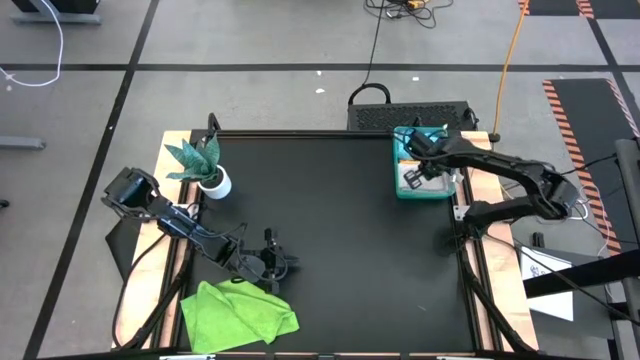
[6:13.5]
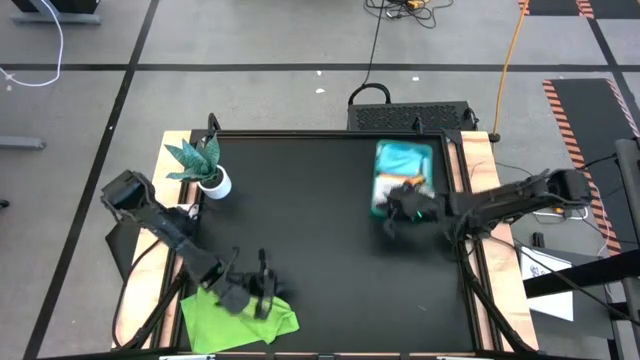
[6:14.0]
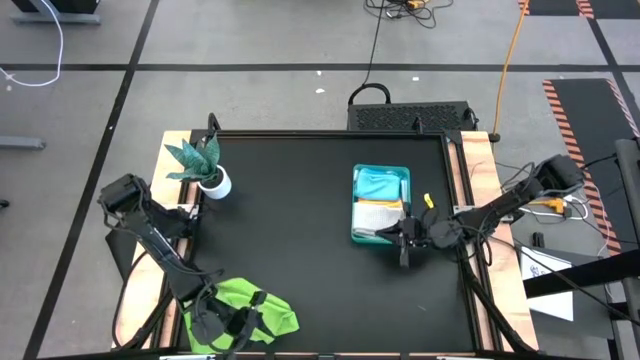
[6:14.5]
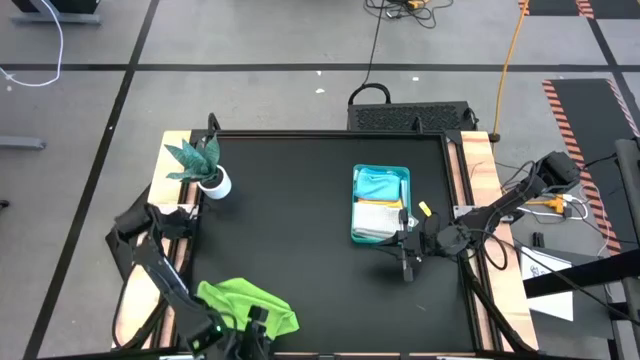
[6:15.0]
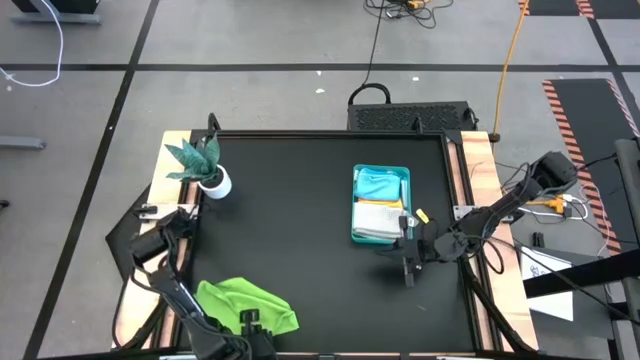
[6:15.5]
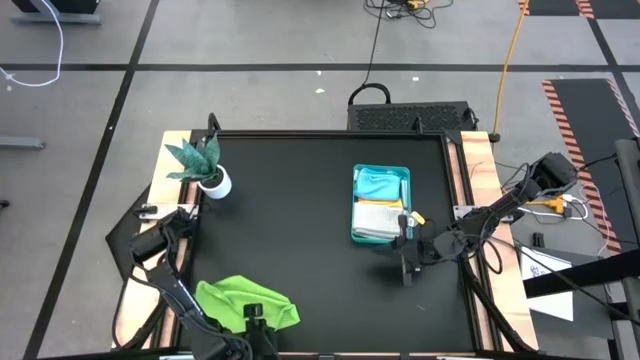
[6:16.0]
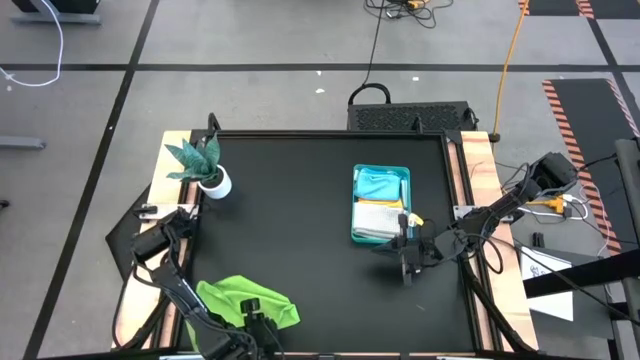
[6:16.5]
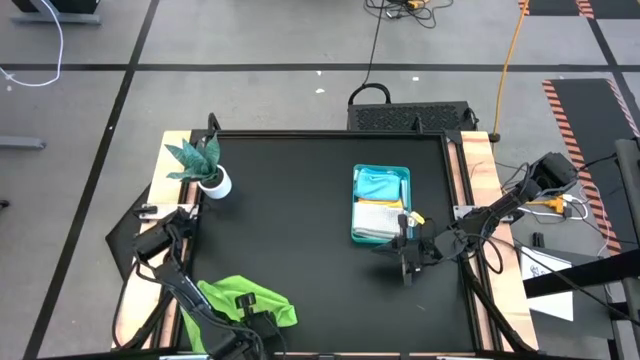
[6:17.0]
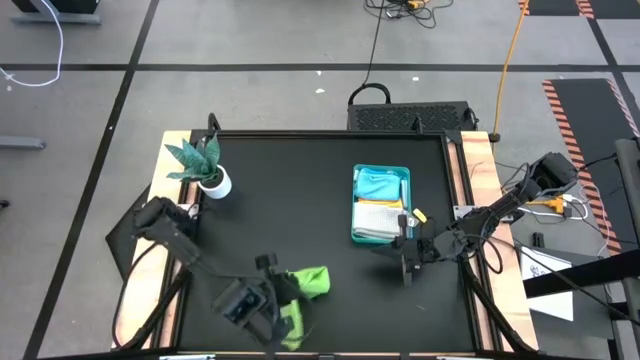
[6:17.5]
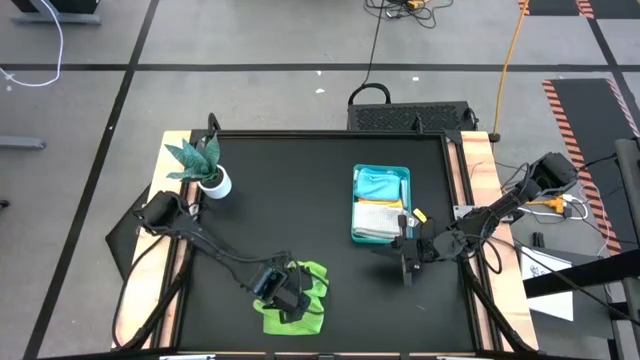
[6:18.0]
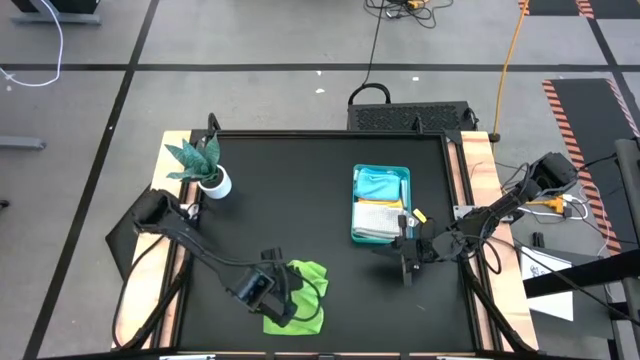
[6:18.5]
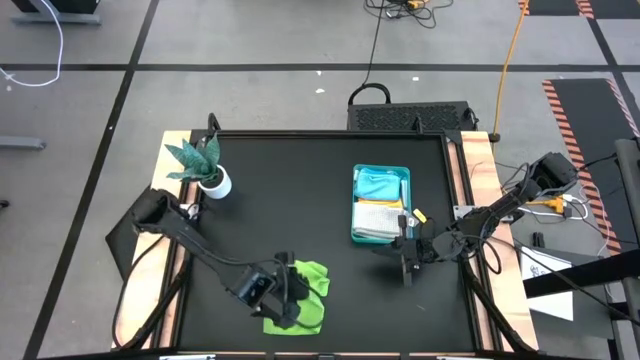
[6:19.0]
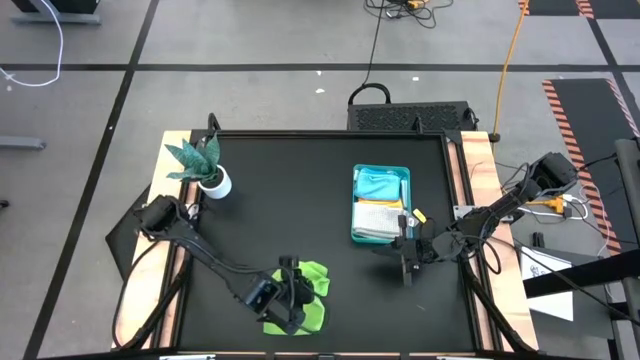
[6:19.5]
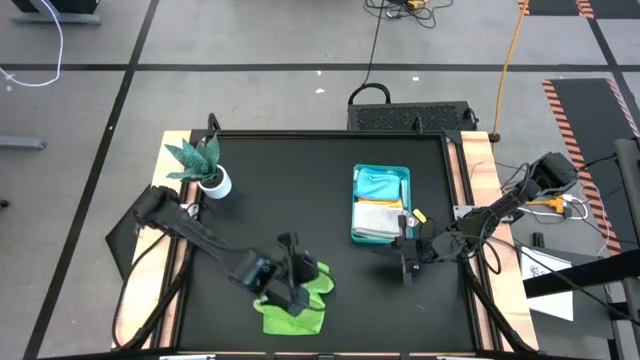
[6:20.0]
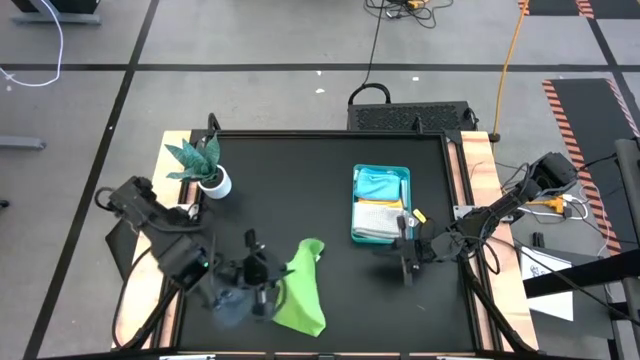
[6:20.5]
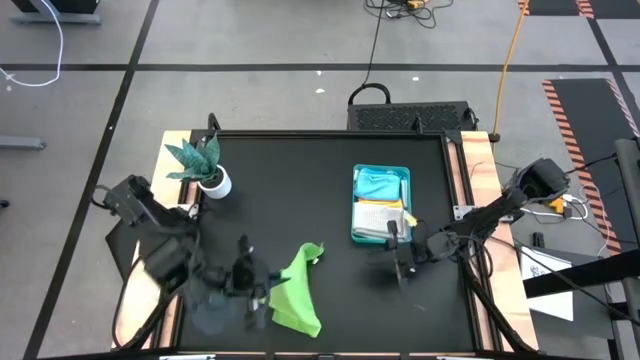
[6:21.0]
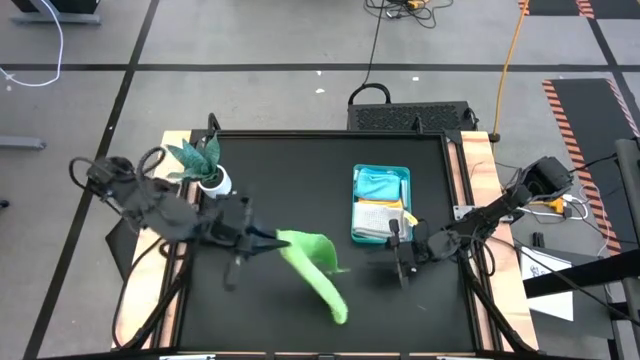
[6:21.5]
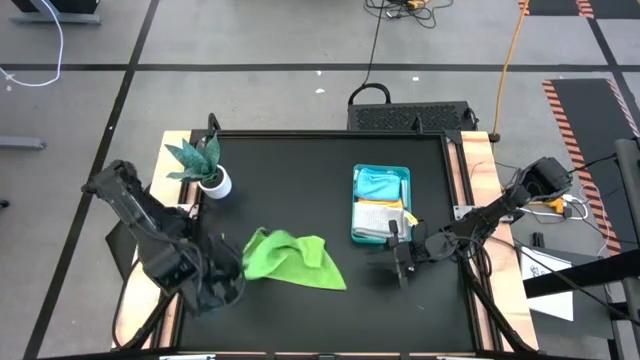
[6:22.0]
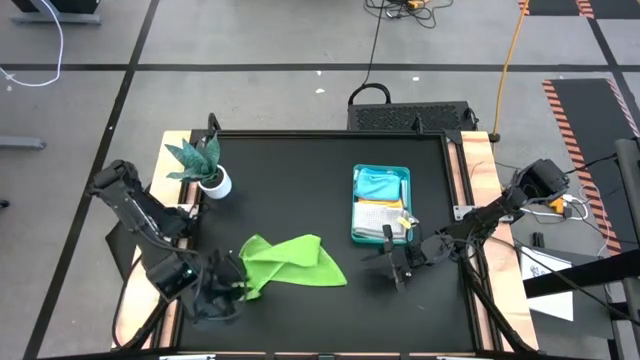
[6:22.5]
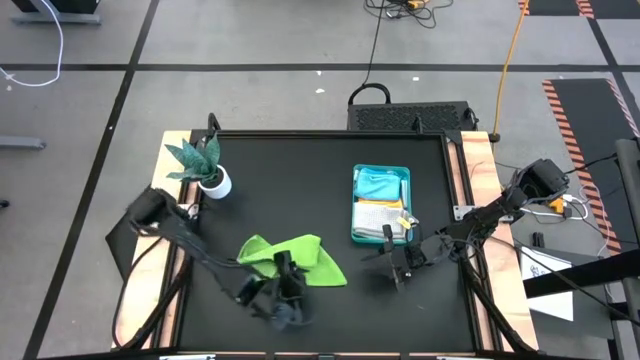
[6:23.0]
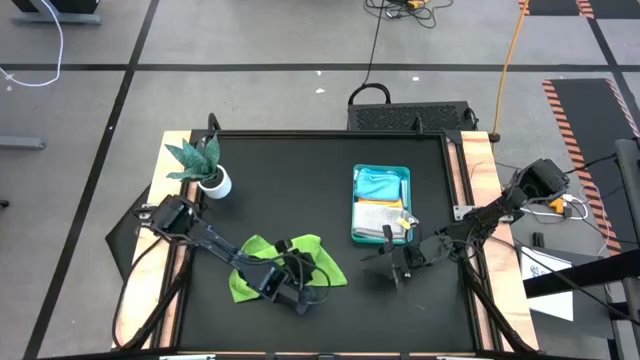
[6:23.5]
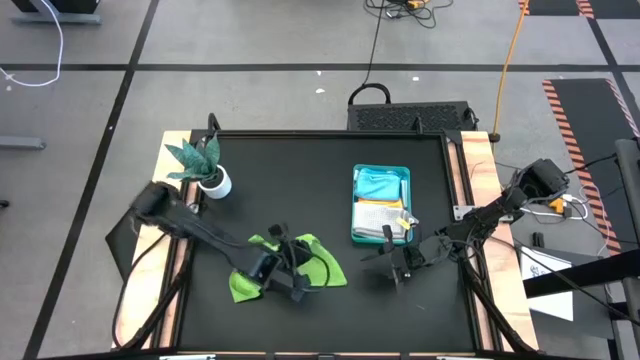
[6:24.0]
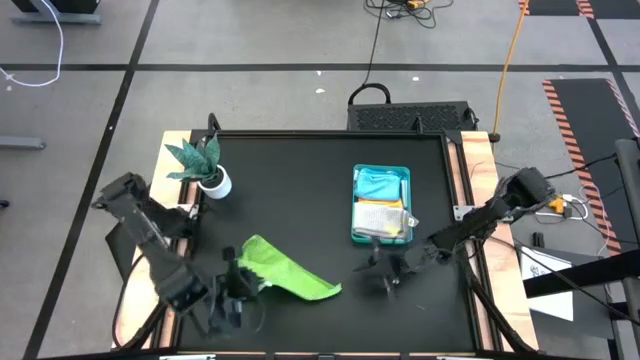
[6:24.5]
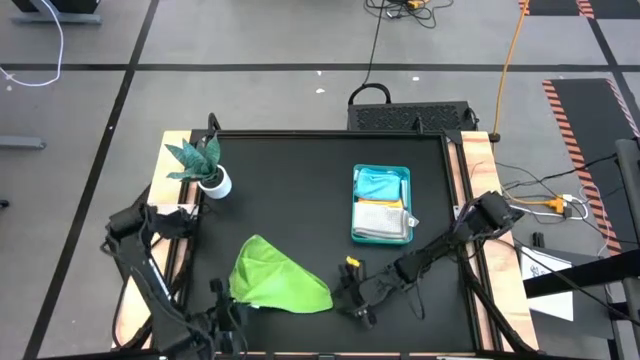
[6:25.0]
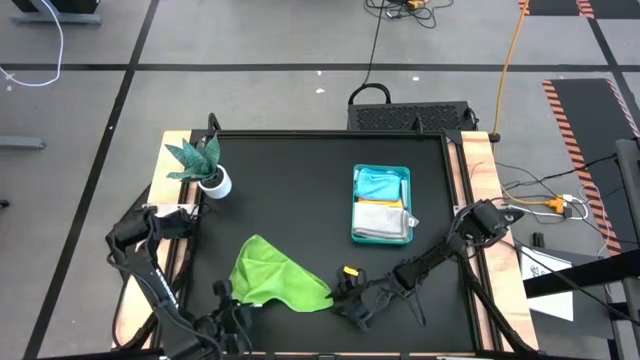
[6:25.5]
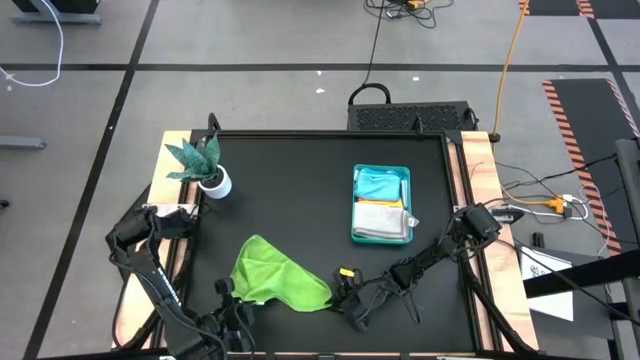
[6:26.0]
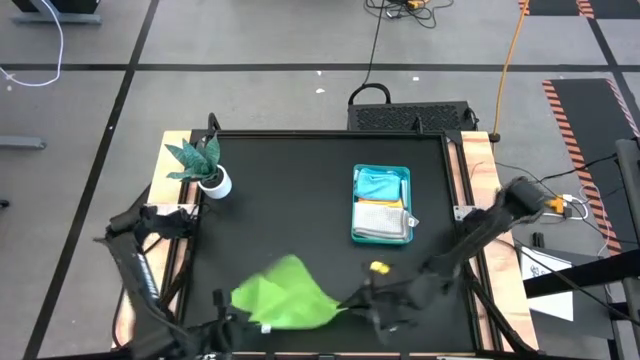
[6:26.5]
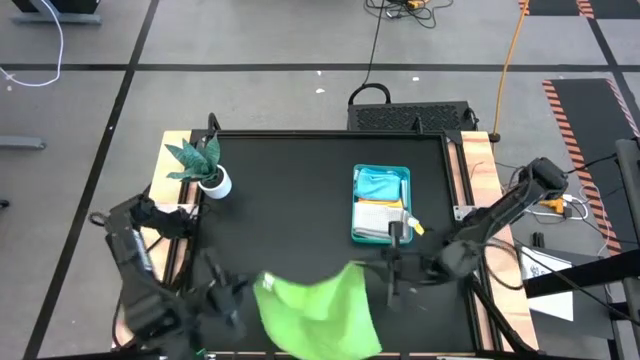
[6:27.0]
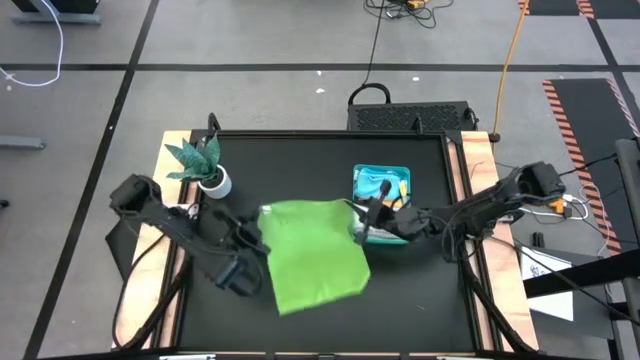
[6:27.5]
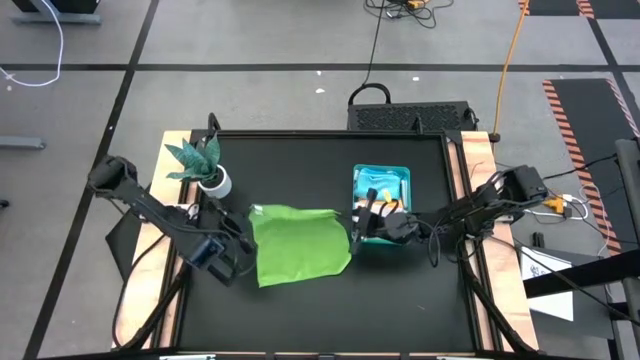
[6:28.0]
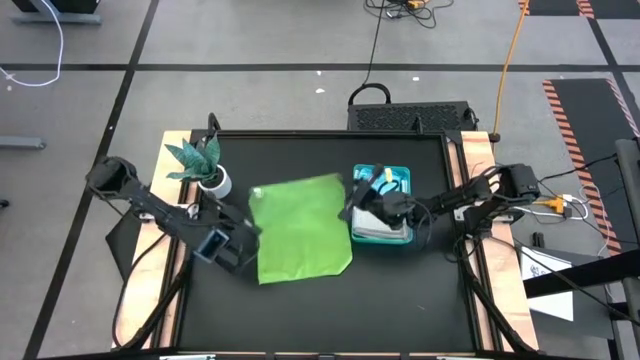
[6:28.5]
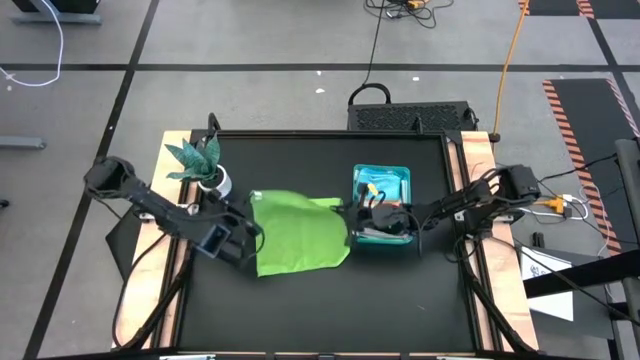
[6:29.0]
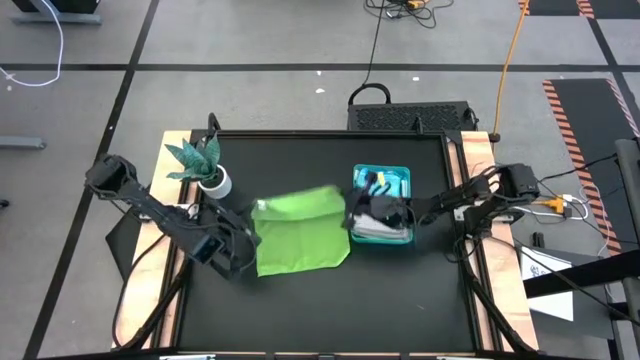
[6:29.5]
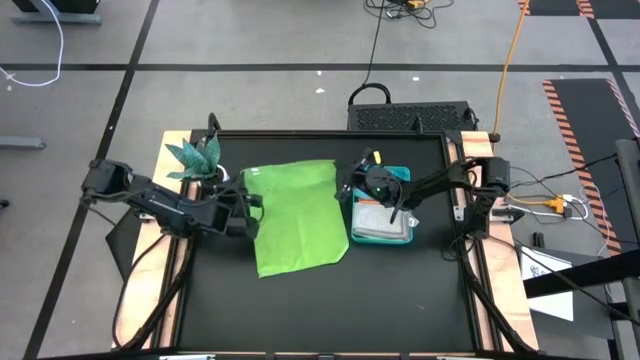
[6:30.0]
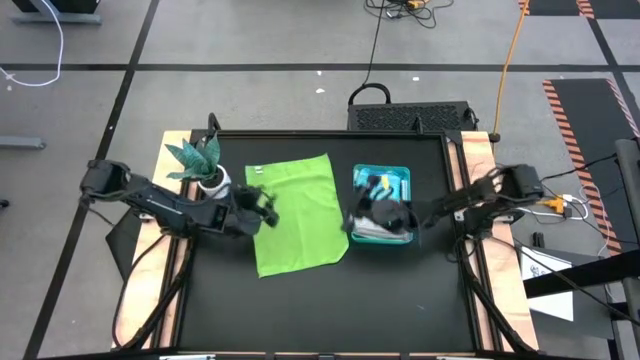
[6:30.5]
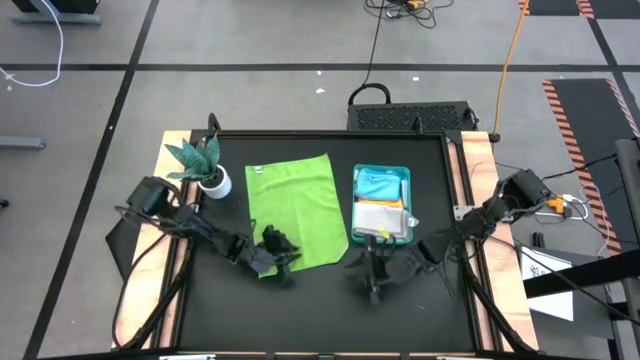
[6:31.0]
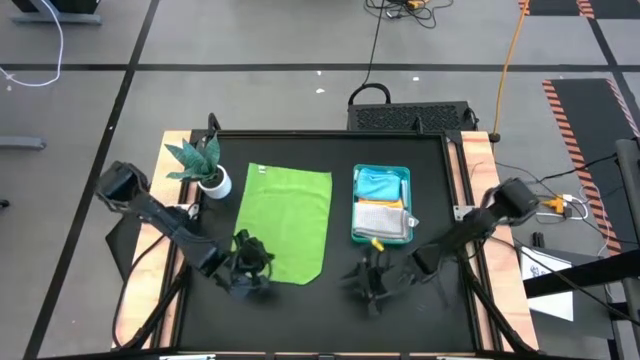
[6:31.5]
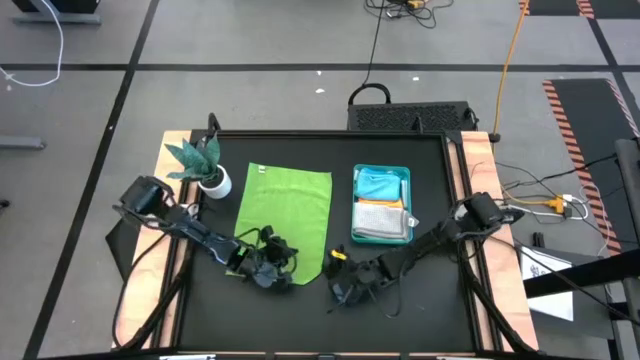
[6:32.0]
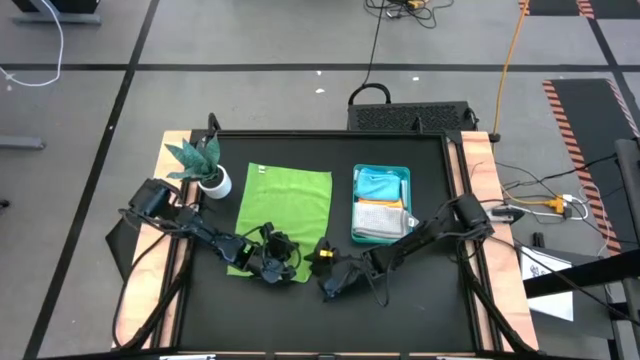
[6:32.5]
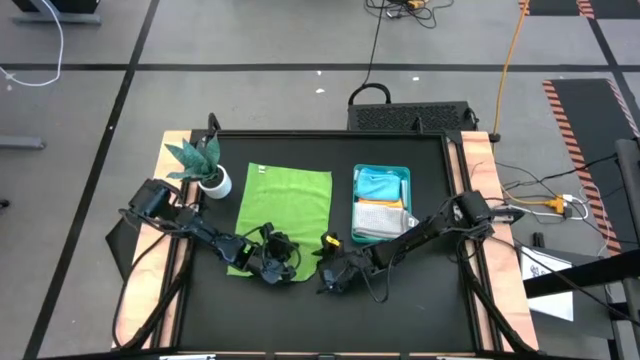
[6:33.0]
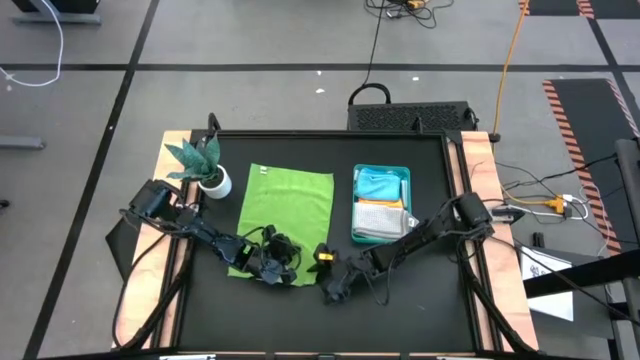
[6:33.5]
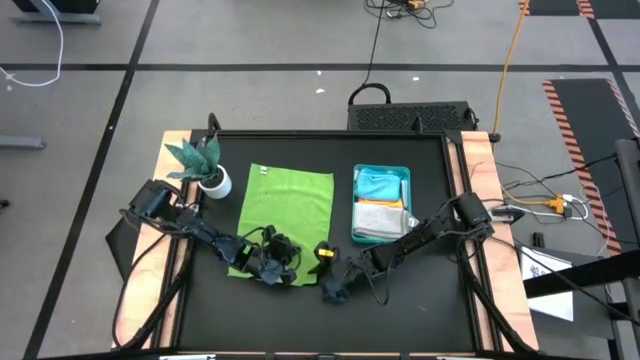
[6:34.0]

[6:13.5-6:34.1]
Task: Fold microfiber towels
Fold the light green microfiber cloth
